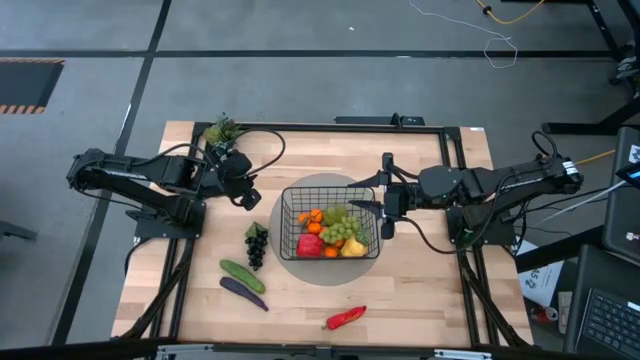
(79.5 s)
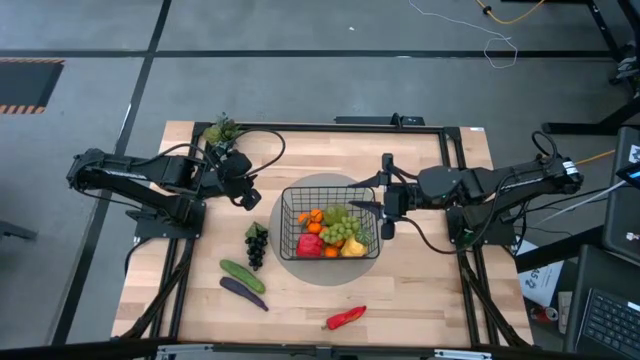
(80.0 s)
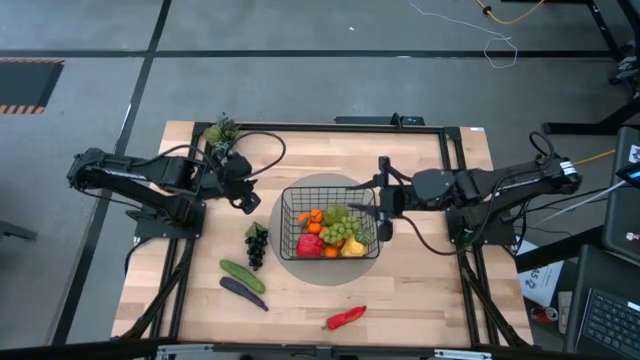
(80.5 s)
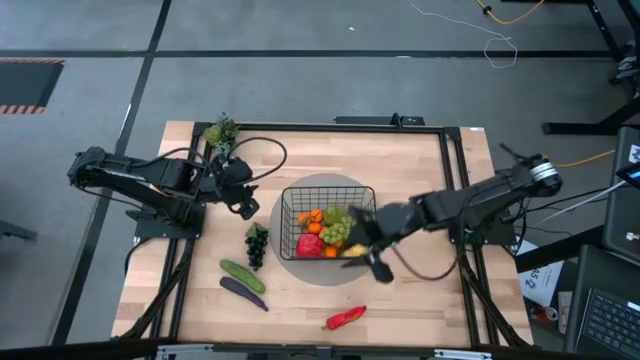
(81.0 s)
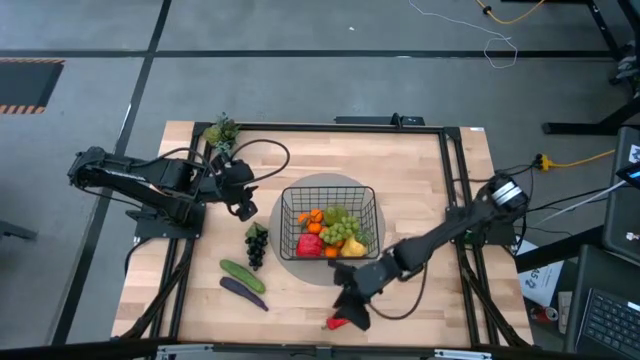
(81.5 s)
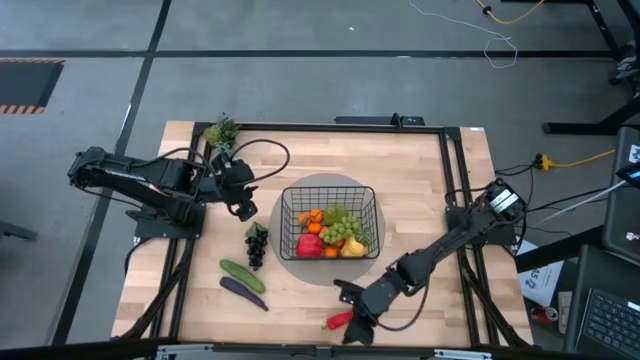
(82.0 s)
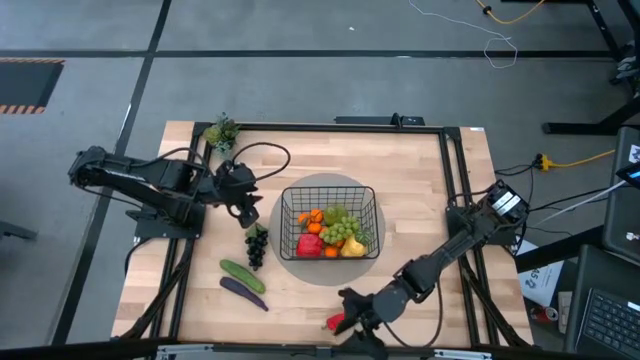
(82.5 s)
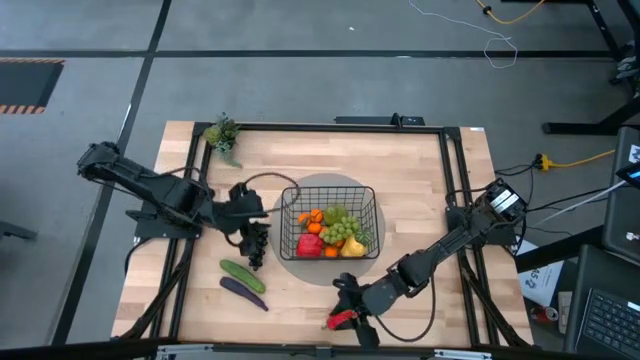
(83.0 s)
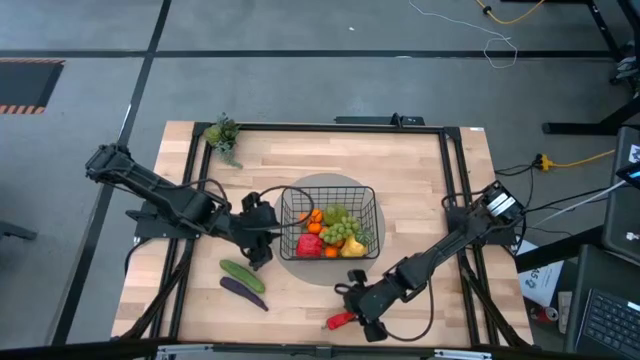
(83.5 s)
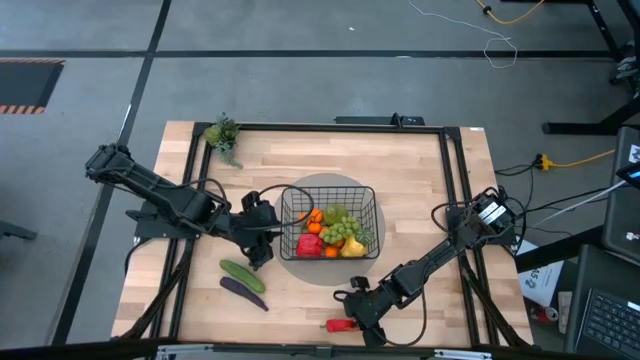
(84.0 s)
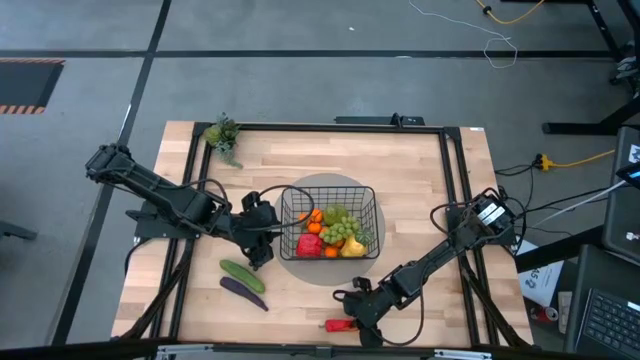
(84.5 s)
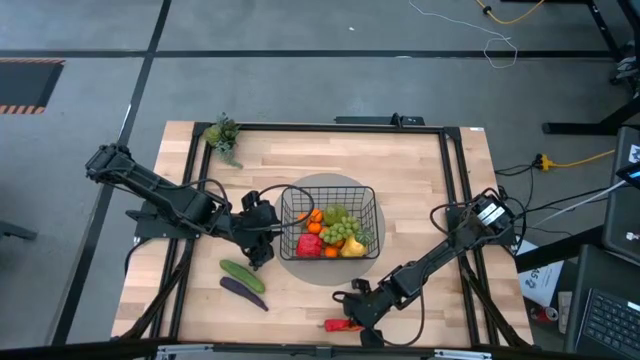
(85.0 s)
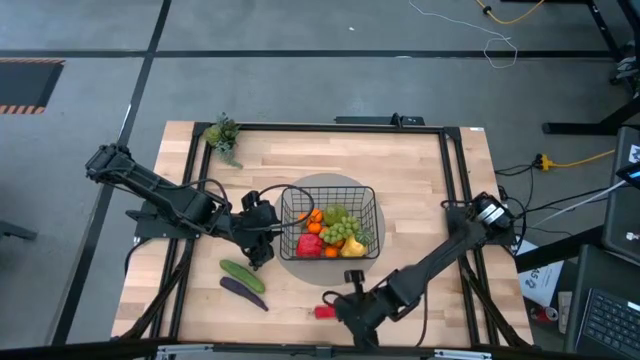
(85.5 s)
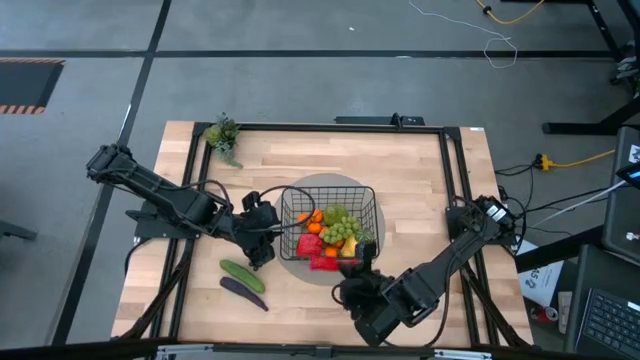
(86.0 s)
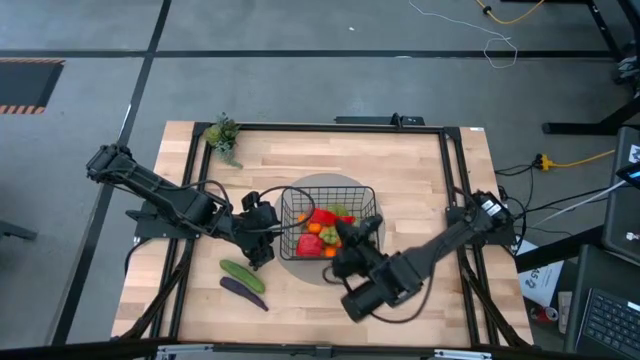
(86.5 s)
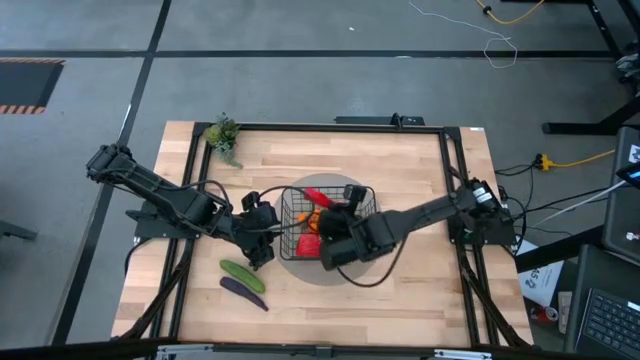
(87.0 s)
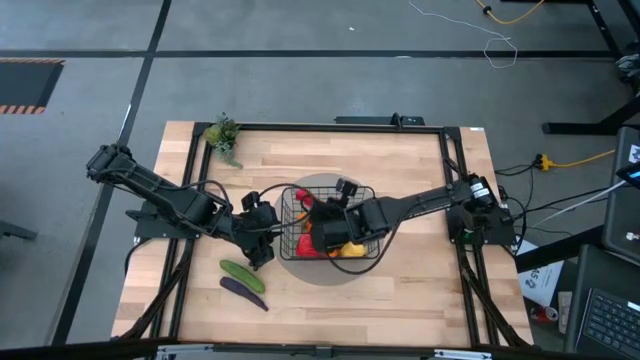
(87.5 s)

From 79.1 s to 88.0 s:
Task: Build produce basket
Put the red chili pepper into the black wire basket

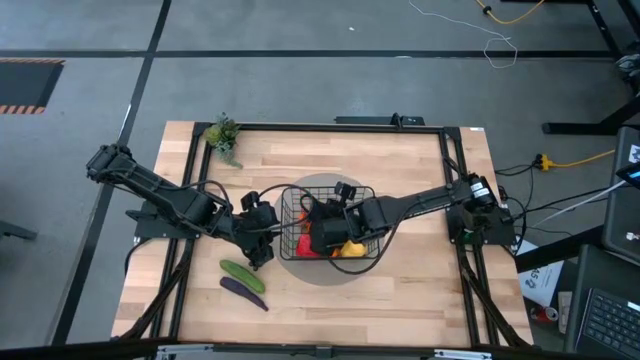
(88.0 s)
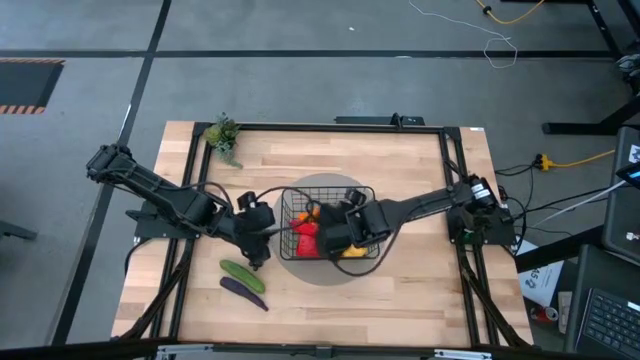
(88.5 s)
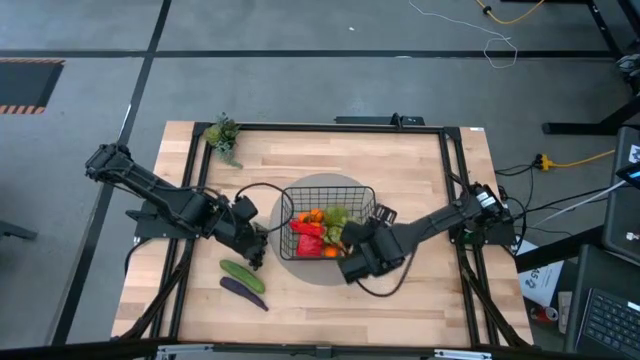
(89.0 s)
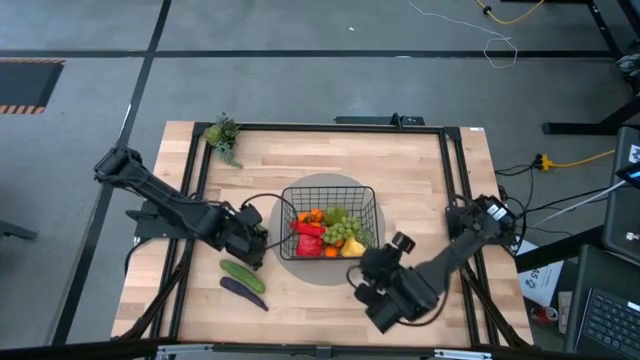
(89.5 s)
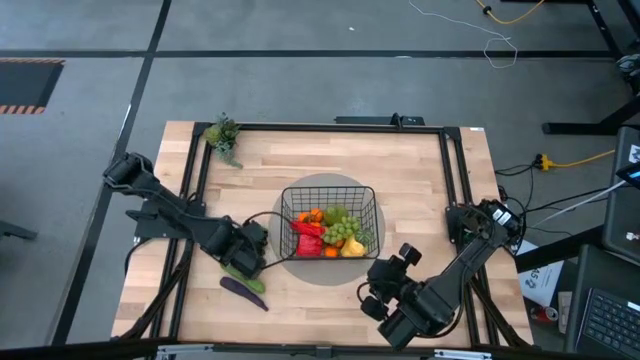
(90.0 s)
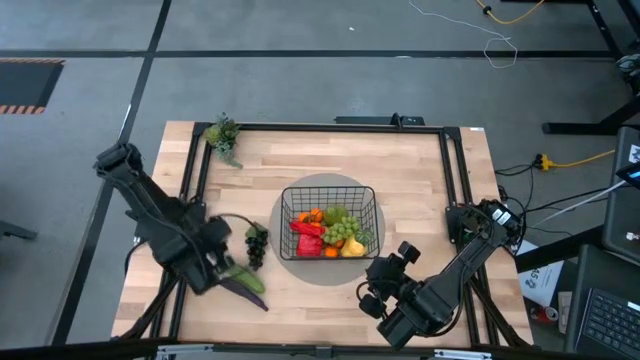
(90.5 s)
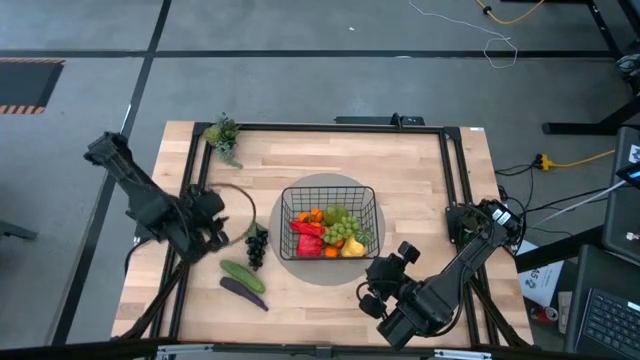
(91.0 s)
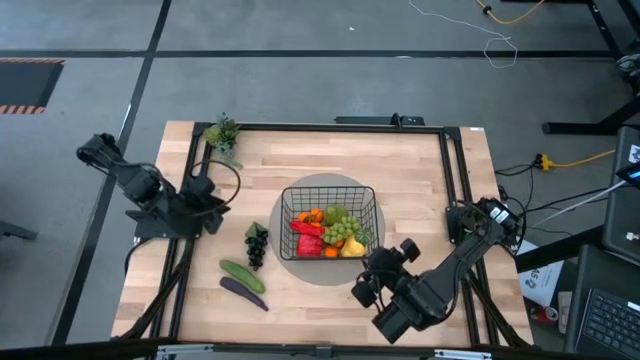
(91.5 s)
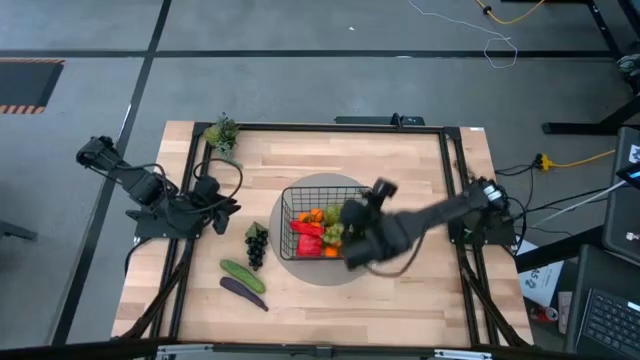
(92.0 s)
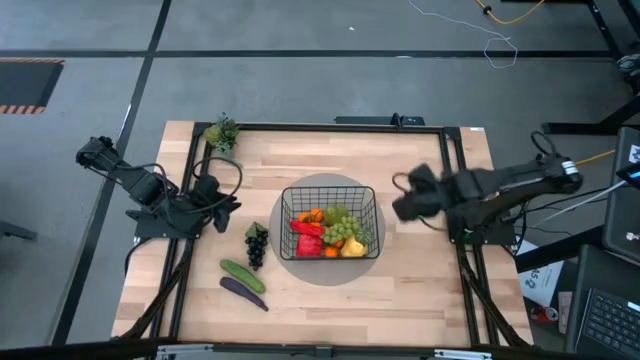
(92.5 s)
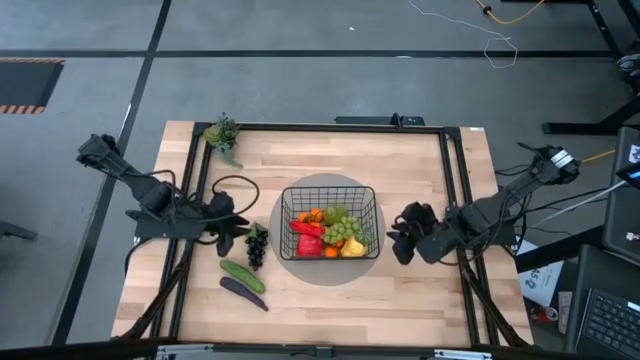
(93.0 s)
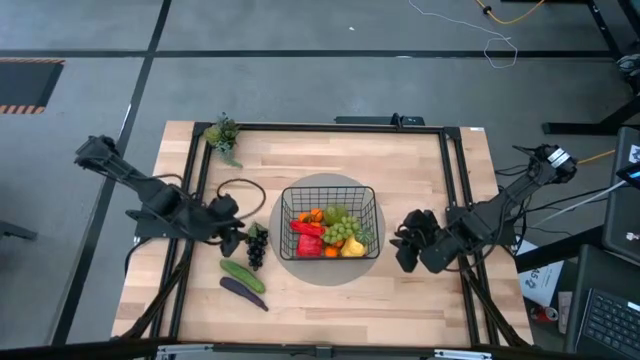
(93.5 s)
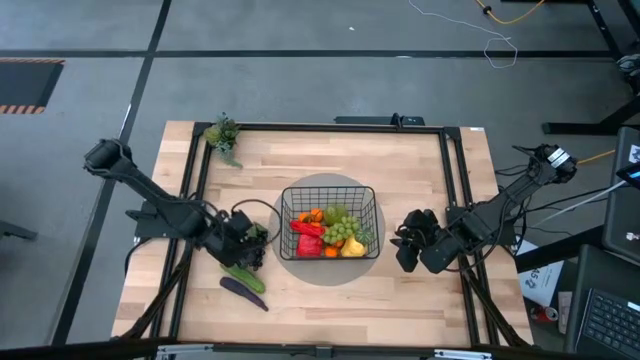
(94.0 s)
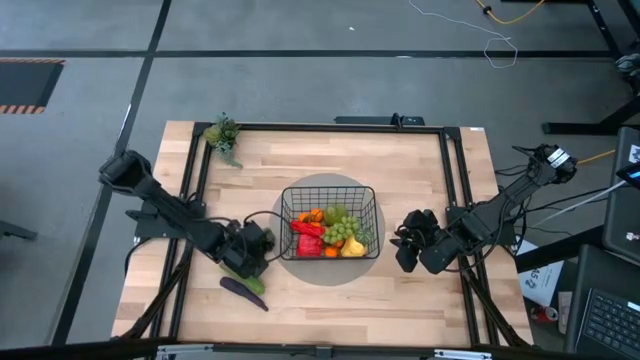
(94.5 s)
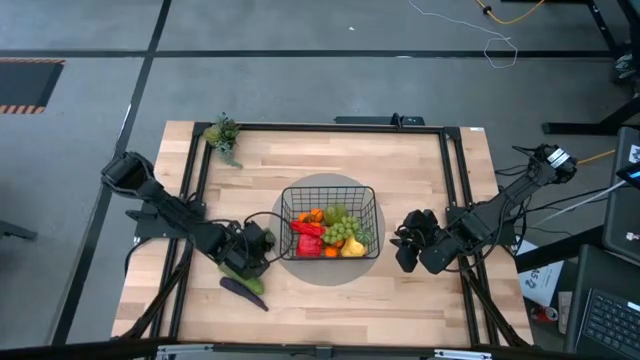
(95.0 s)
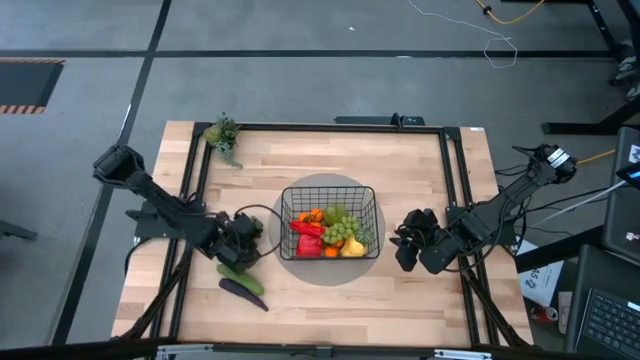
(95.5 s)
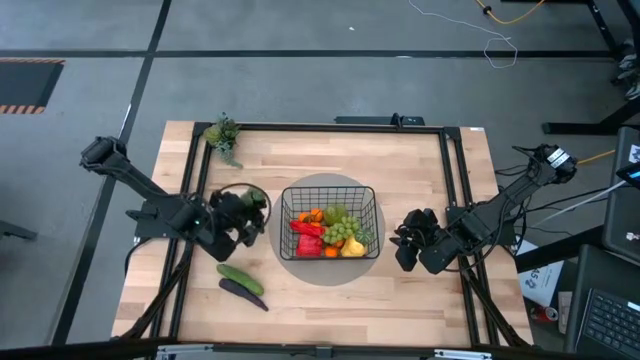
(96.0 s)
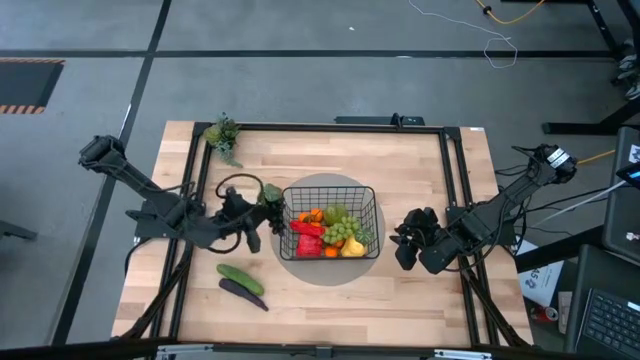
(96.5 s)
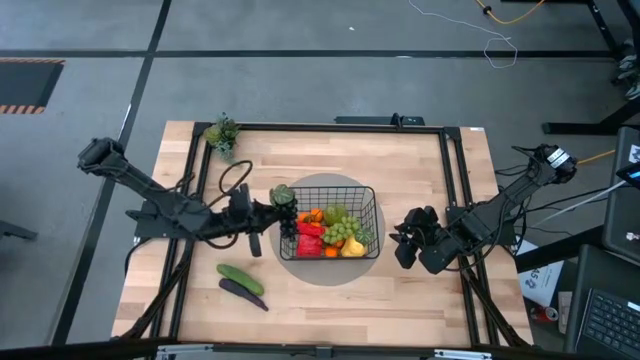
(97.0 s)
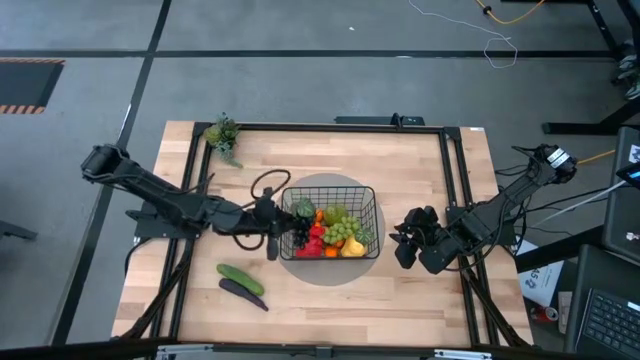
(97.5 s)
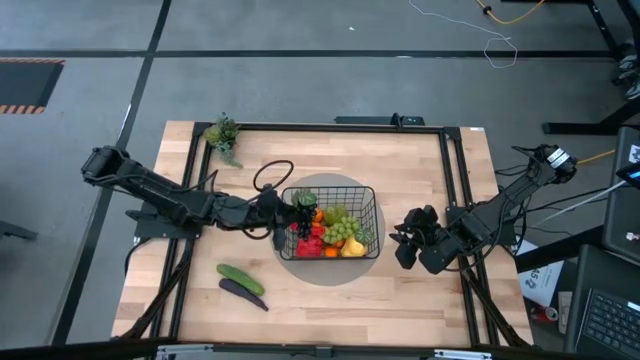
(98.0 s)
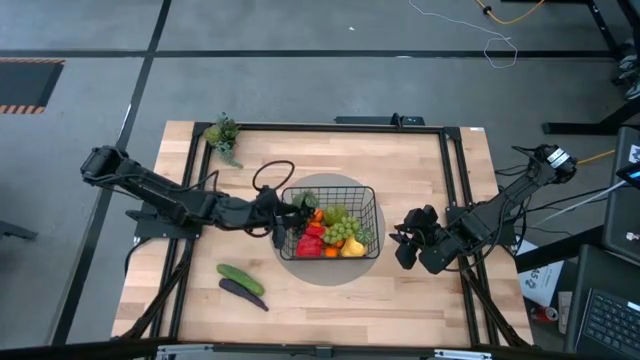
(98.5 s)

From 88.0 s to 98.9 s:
Put the black grapes into the black wire basket

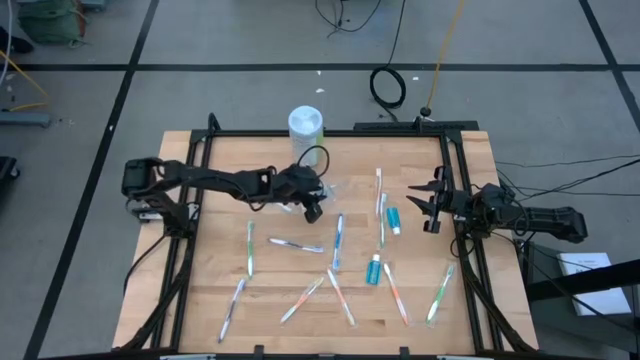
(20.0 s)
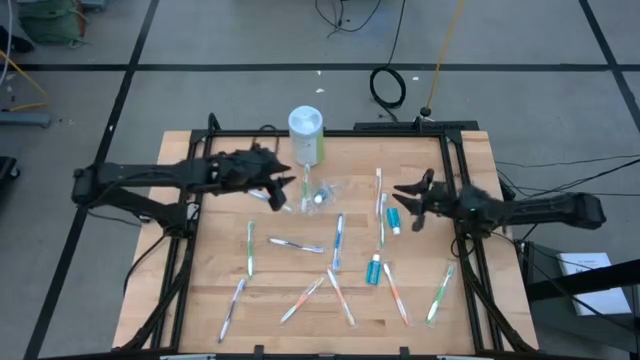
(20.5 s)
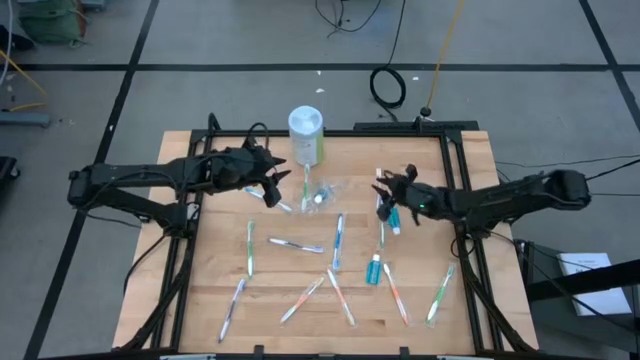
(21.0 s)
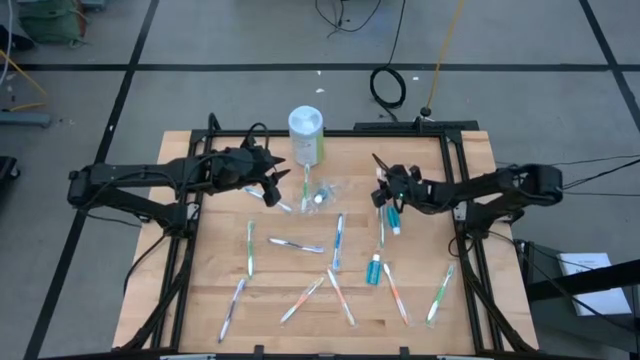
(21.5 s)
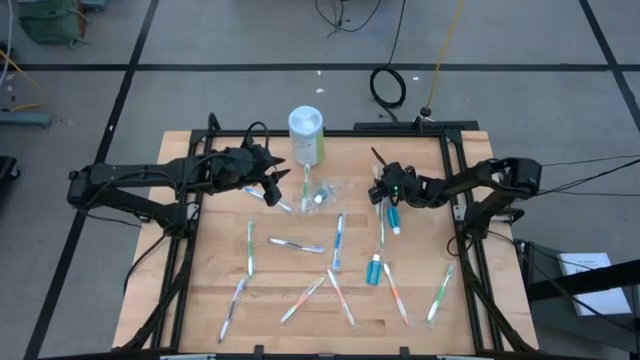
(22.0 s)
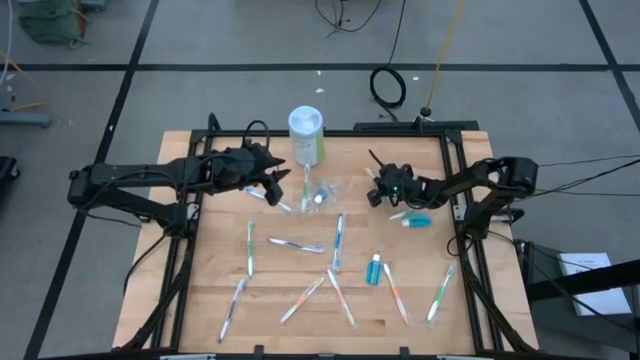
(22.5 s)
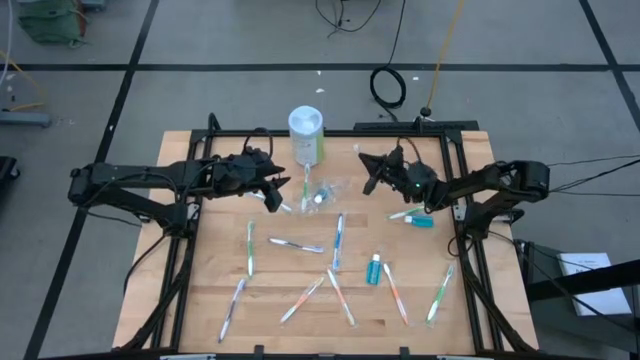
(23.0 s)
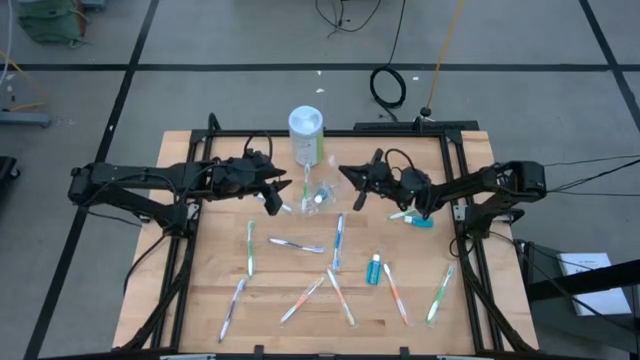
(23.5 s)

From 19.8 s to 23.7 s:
Task: Pick & Place toothbrushing station
Put the orange toothbrush into the transparent organizer
